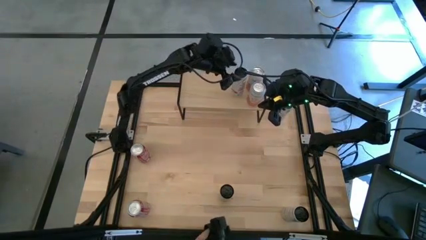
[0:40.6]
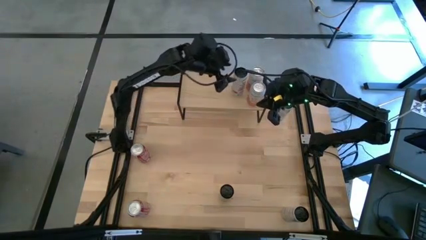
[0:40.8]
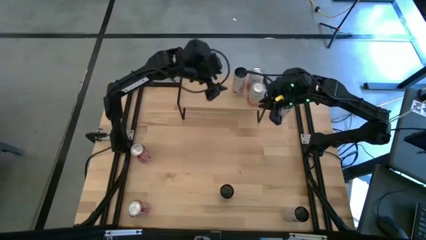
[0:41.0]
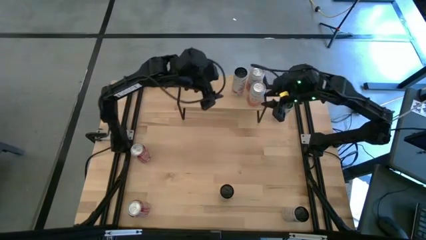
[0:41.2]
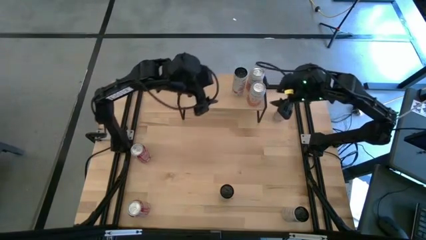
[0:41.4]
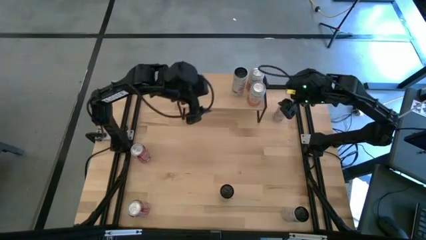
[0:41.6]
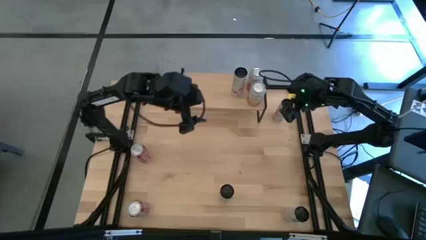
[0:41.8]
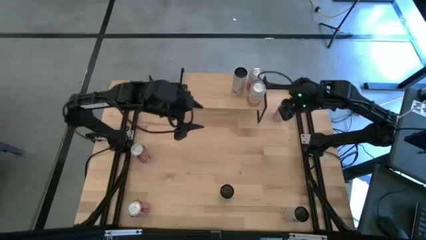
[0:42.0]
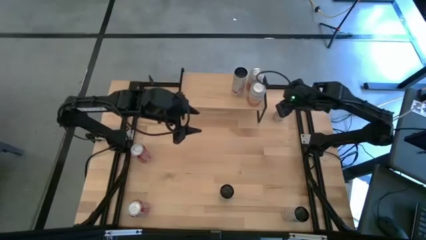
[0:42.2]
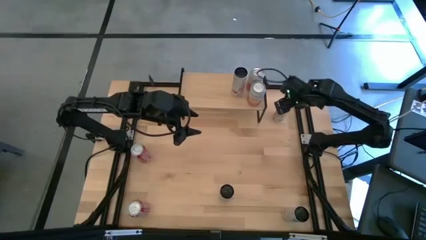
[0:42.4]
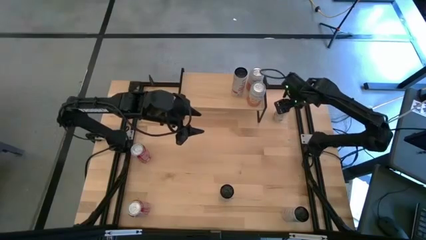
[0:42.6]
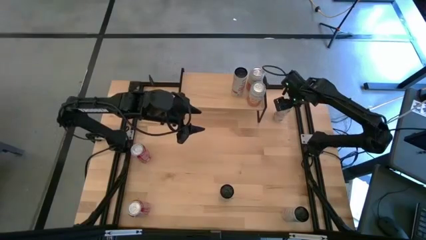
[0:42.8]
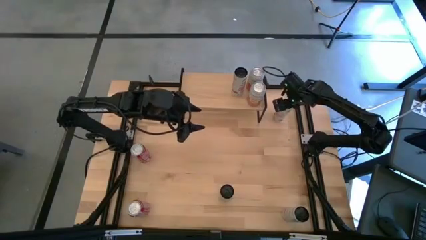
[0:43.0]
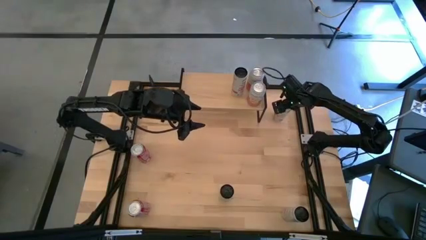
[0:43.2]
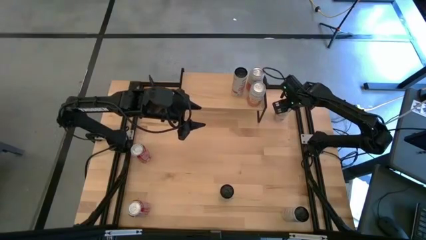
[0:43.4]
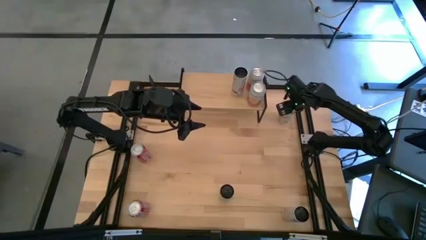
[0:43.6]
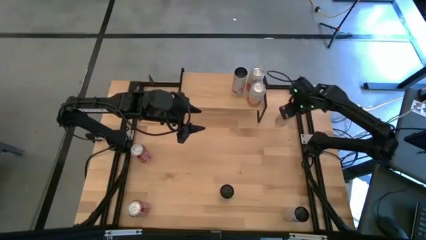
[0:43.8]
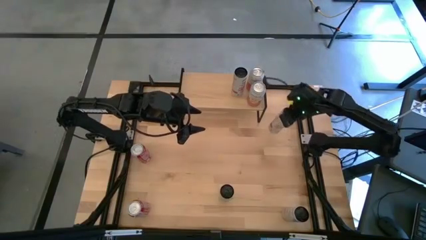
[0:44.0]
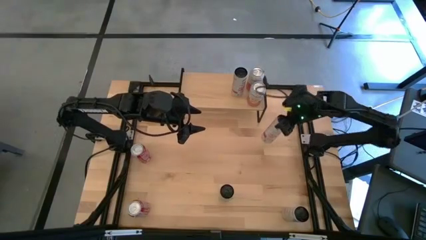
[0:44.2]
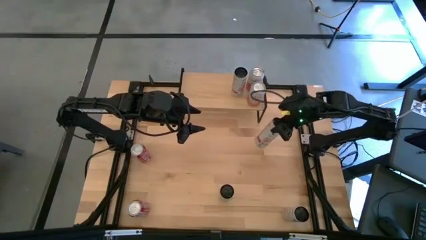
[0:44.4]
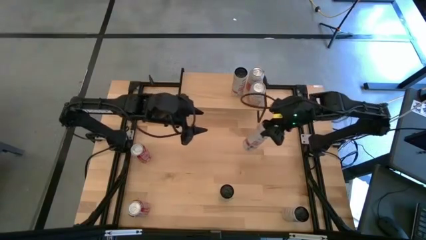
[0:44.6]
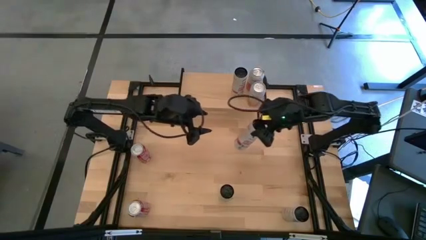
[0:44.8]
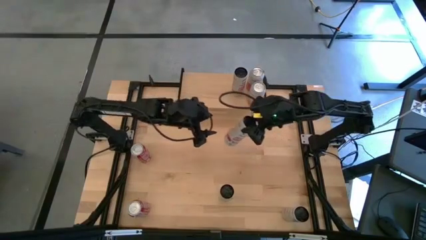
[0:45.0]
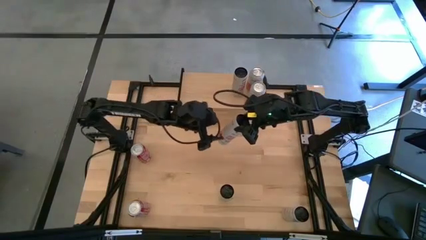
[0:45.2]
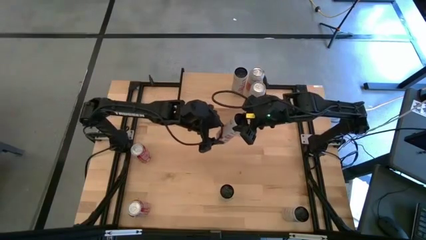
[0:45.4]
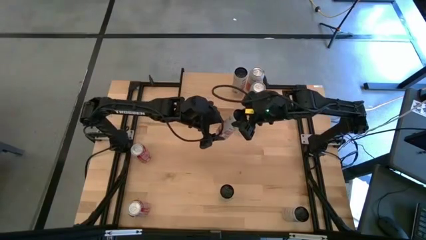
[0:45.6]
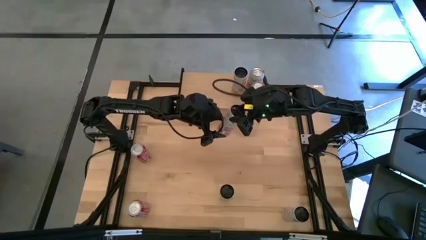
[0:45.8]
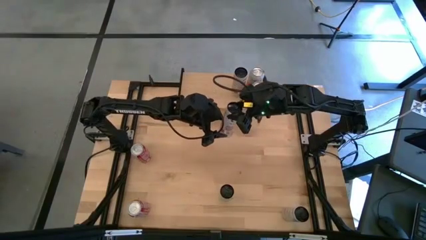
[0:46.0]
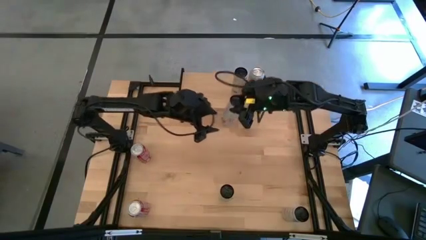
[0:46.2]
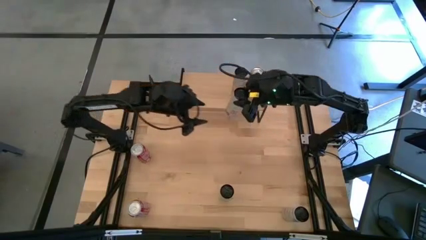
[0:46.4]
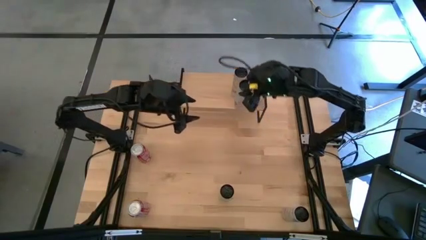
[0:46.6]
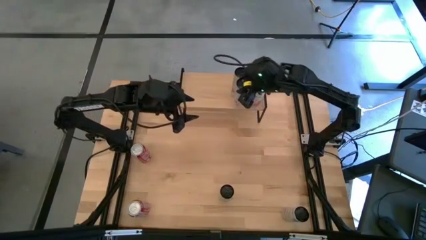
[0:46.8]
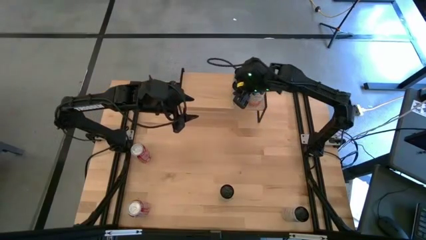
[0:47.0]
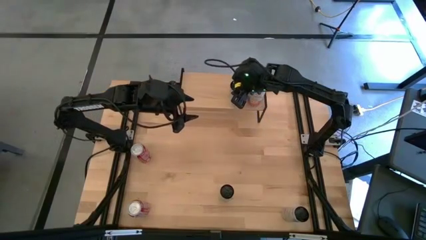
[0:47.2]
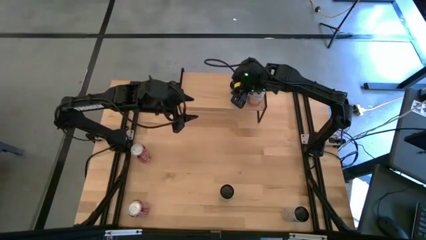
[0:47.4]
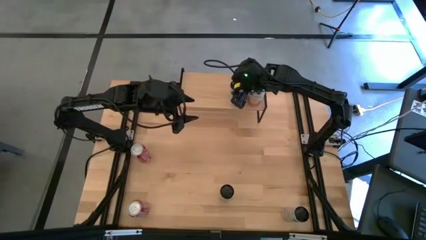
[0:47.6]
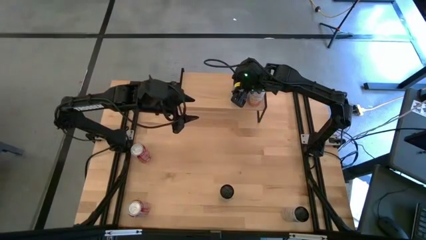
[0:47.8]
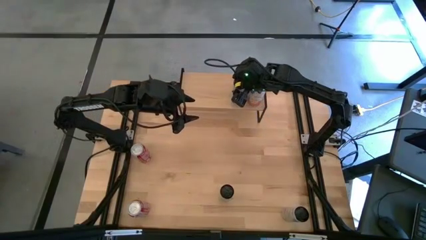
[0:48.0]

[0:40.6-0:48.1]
Task: Place canned beverage on shelf
Put the white pink soda can aligned with the other white pink soda can on the shelf

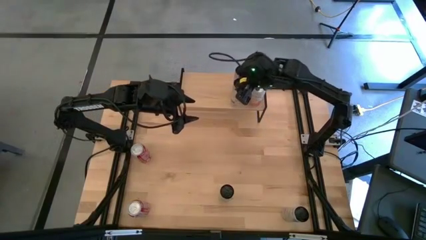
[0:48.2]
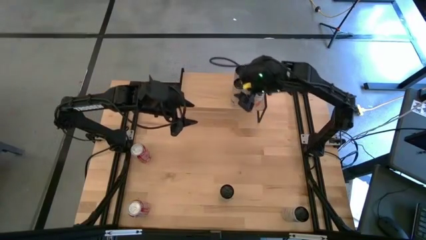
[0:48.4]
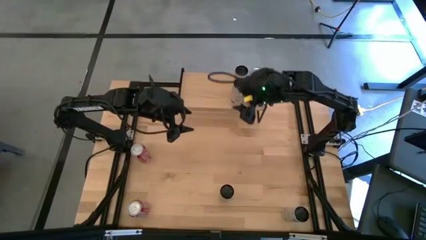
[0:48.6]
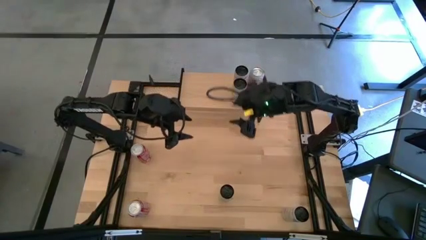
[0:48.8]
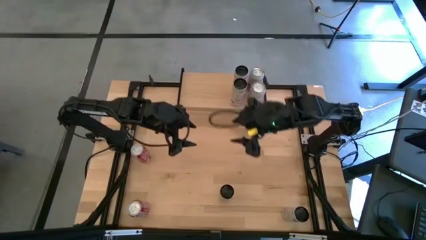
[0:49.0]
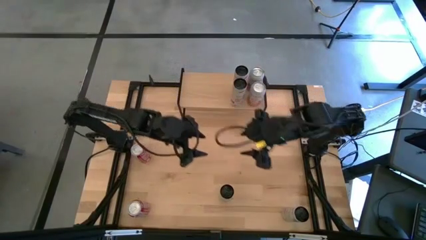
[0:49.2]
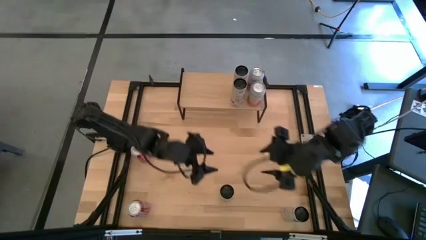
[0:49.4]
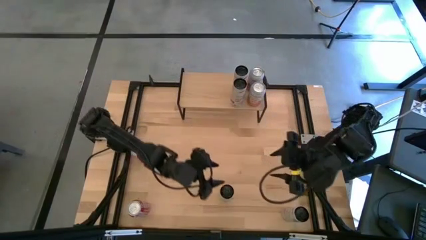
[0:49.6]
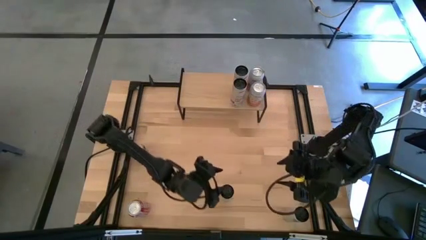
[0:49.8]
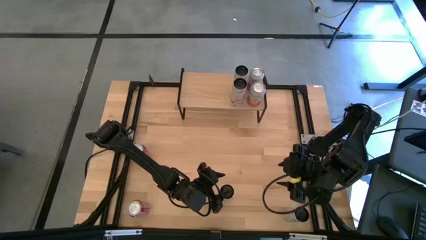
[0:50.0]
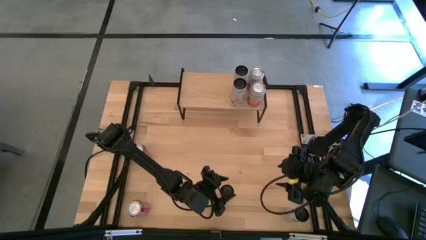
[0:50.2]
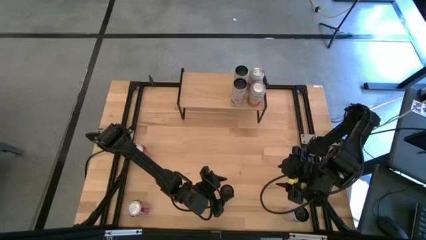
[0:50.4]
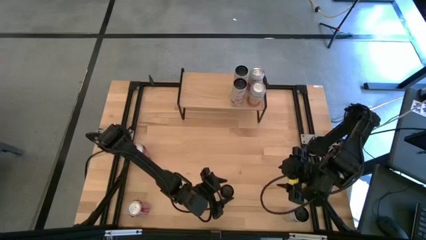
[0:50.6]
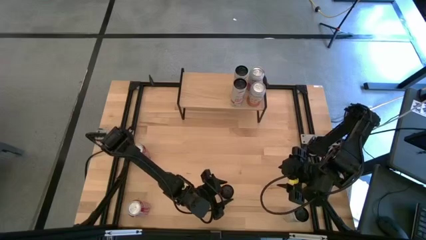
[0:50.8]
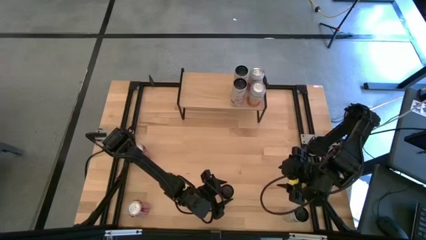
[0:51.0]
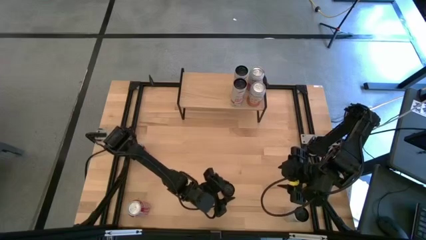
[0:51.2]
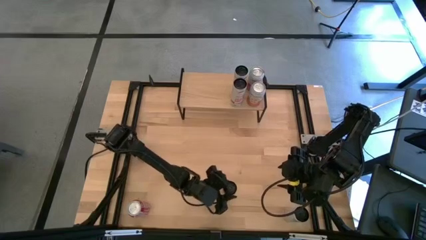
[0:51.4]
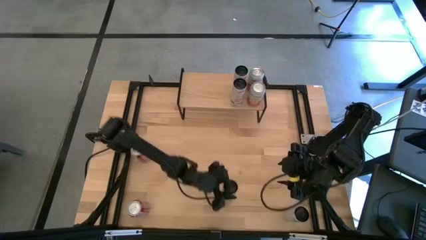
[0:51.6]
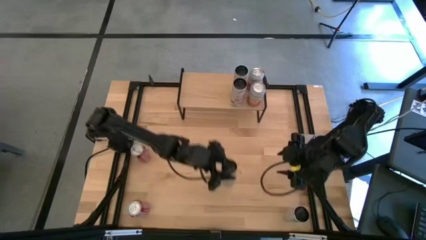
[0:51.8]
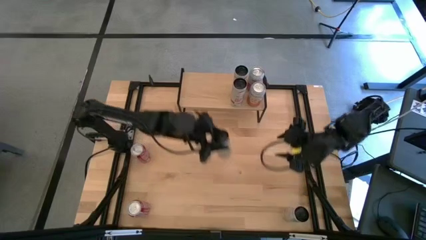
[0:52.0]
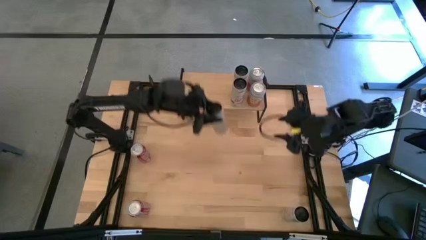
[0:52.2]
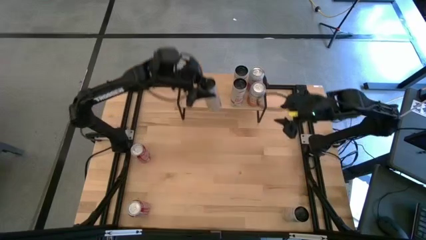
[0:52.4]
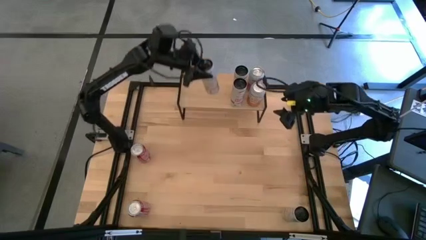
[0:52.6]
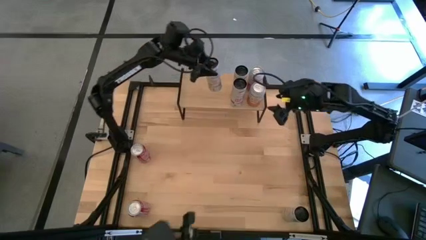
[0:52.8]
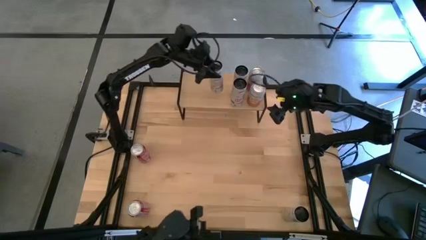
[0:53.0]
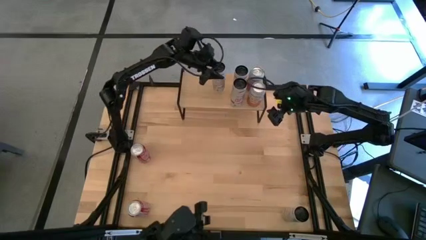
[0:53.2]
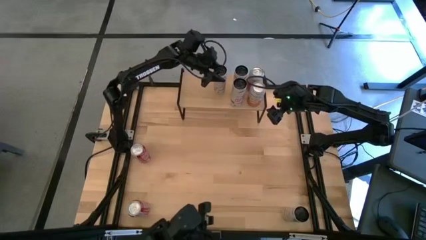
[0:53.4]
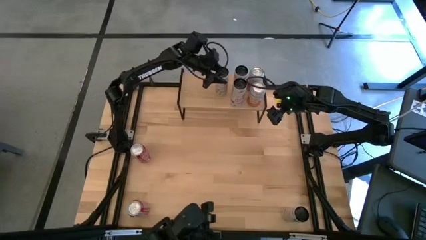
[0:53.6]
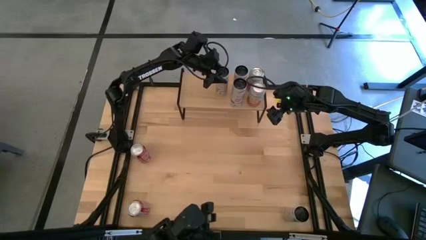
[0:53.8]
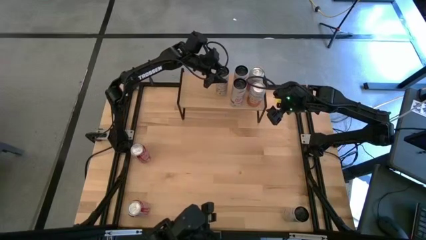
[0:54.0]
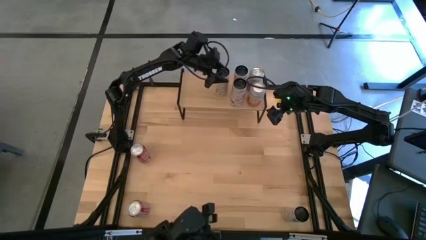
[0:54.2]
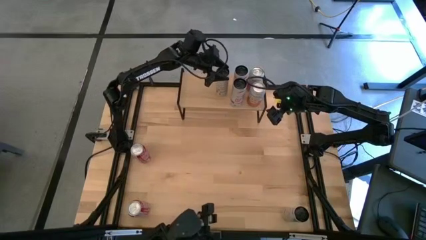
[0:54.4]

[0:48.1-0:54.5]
Put the left white yellow soda can on the shelf

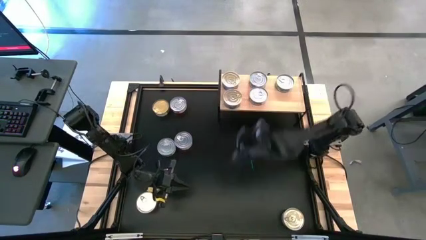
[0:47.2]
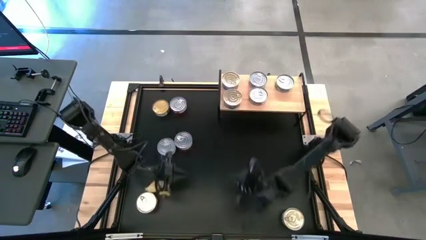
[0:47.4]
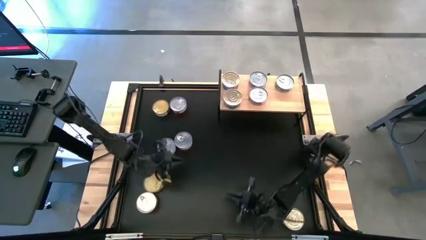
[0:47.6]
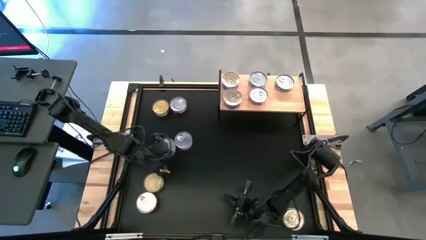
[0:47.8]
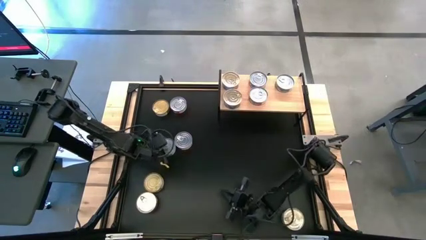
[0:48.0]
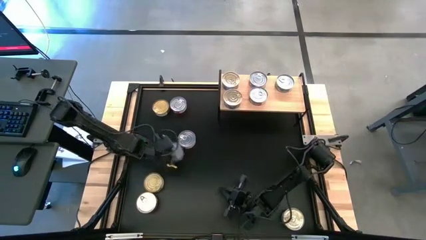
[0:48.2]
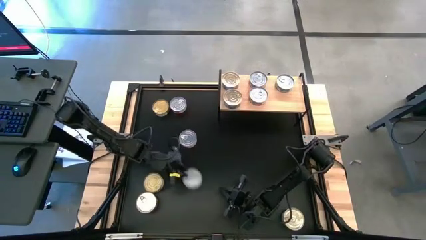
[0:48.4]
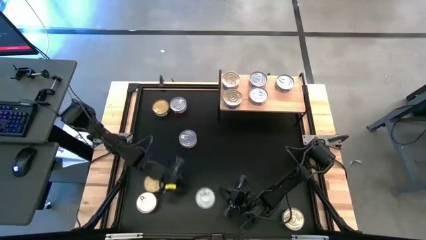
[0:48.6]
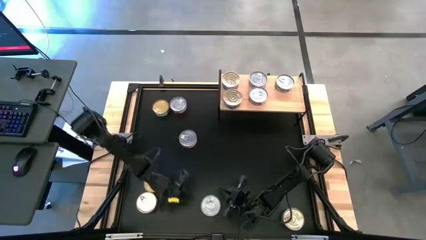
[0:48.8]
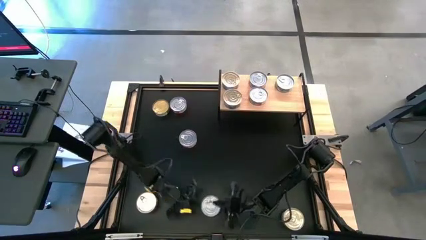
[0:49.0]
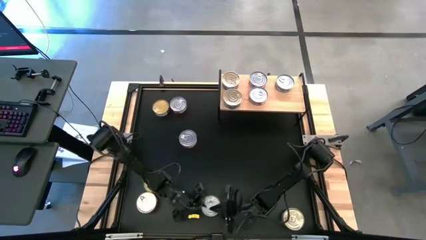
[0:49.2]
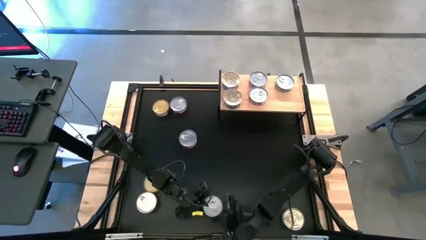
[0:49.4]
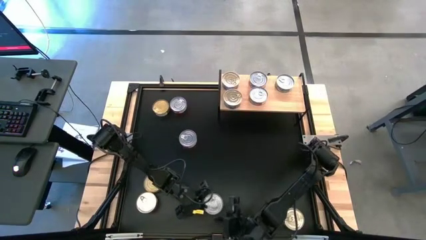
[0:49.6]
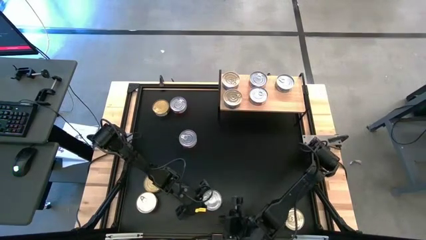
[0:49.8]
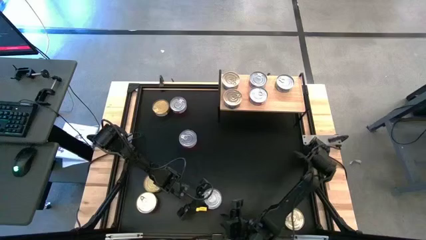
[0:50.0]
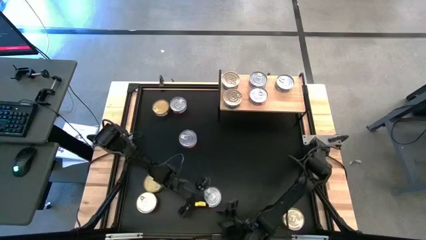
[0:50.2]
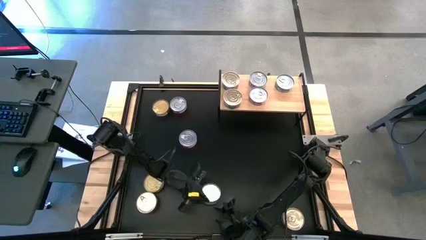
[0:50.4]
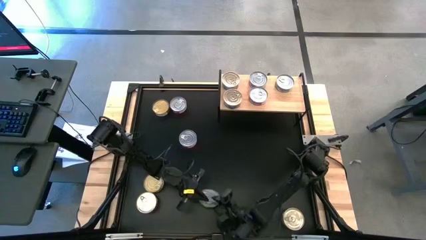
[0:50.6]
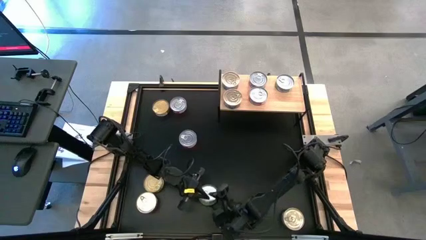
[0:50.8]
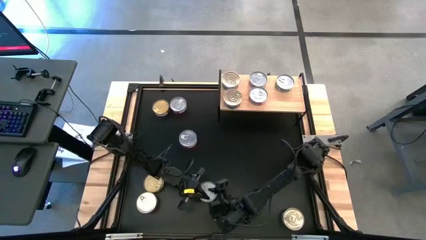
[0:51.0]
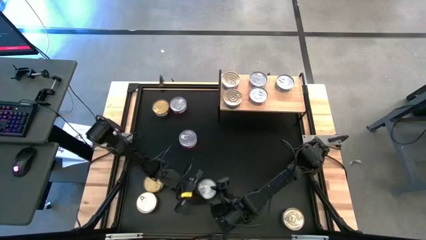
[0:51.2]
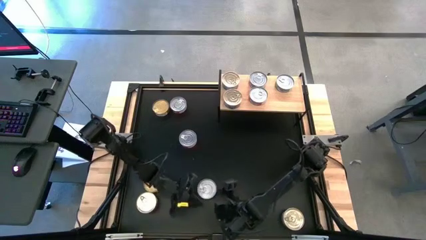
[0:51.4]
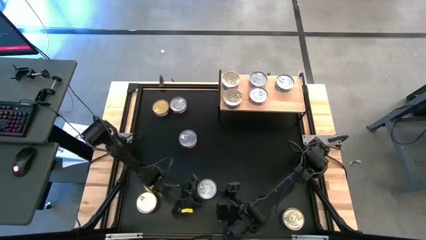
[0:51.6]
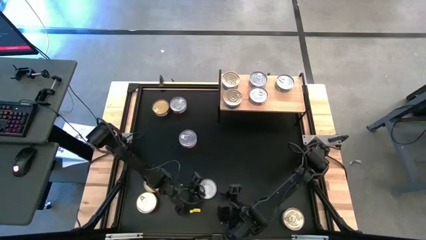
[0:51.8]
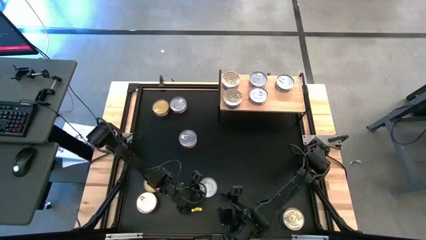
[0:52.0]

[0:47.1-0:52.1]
Task: Stack canned seafood by type on shelf
Put the green tuna can on the shelf aligned with other green tuna can
